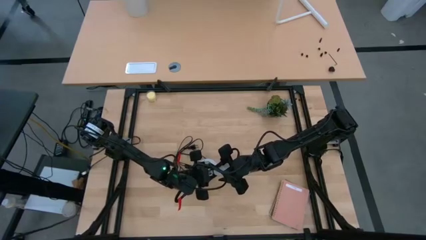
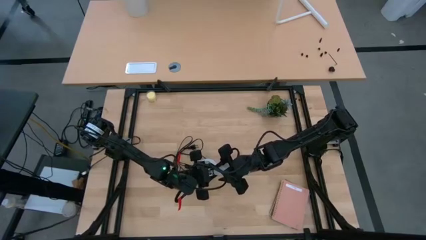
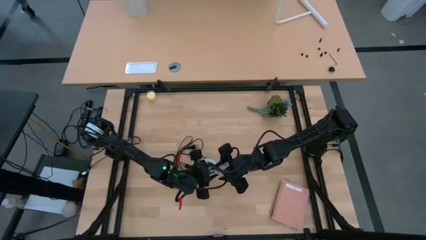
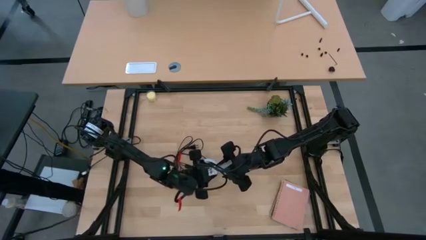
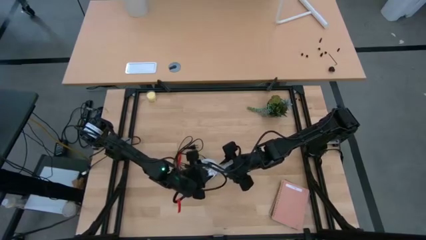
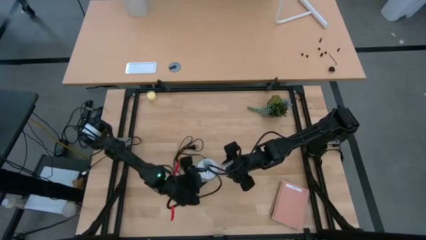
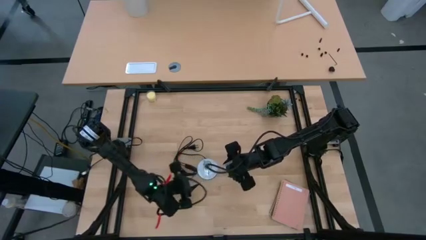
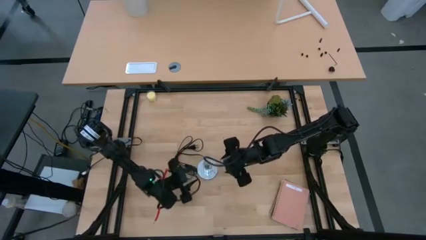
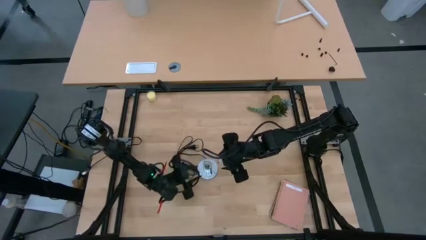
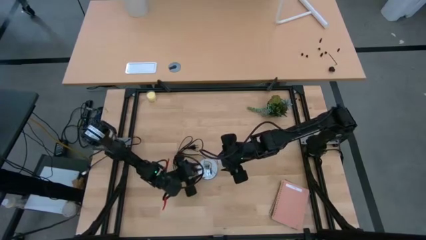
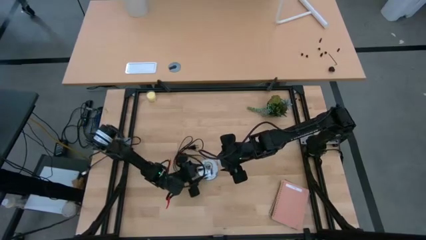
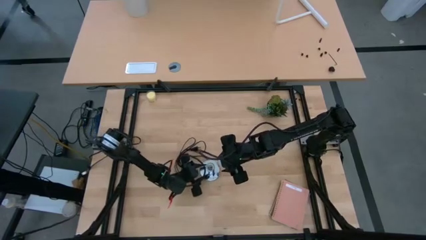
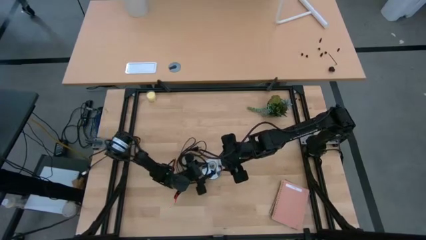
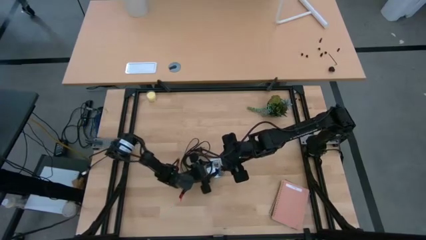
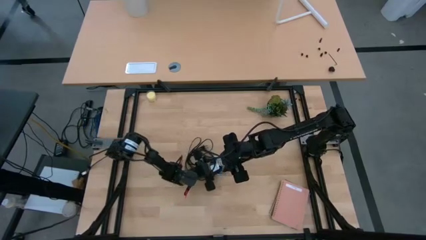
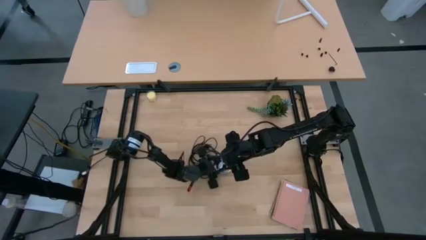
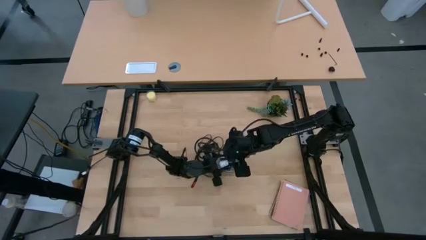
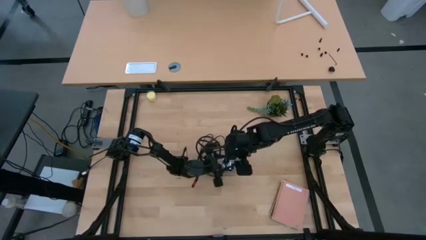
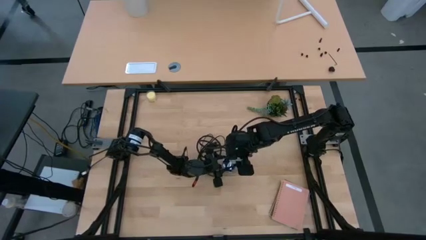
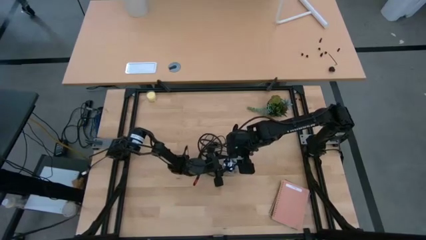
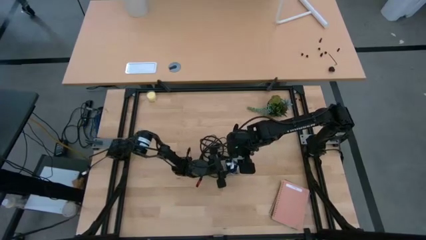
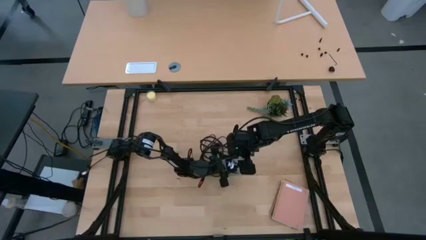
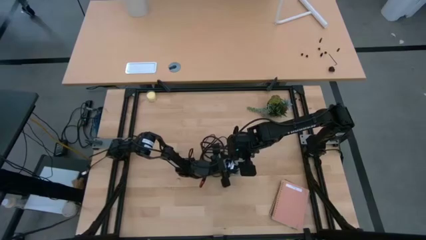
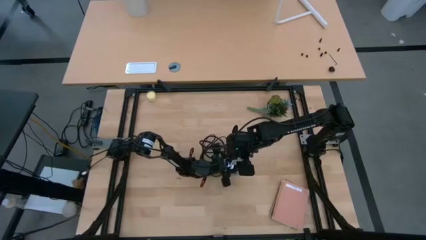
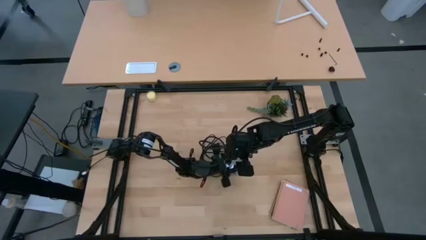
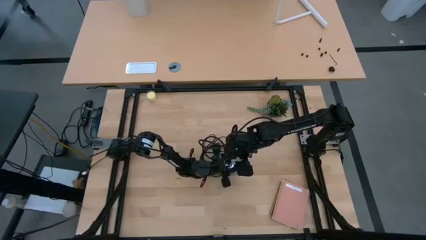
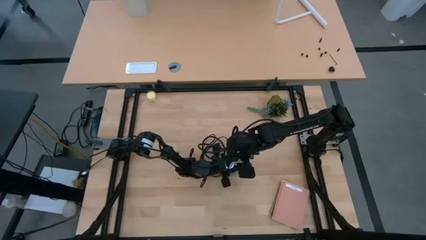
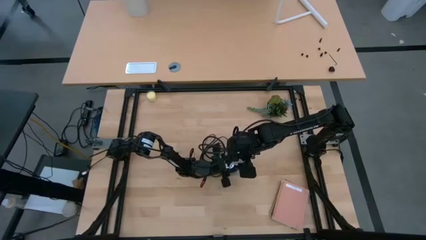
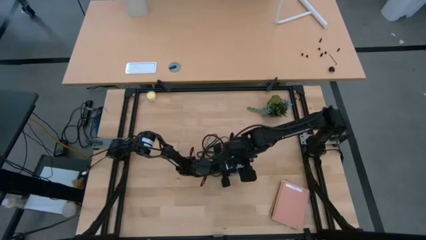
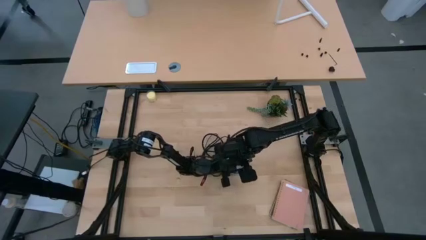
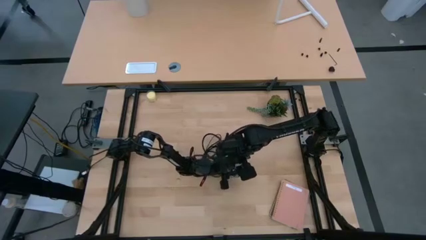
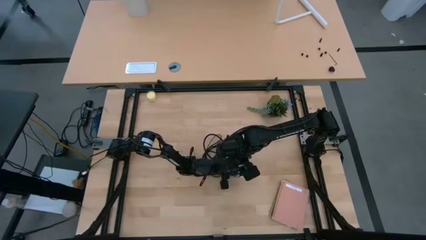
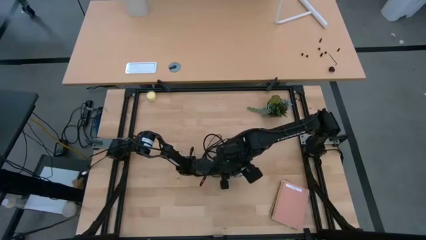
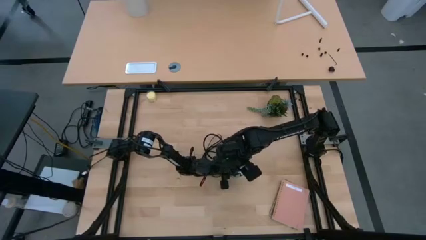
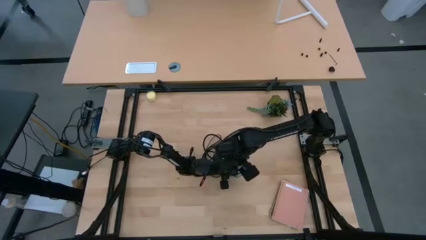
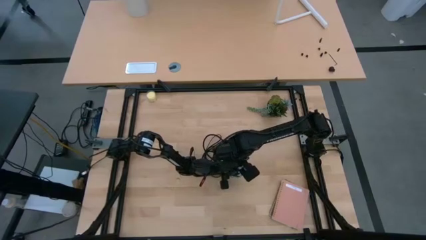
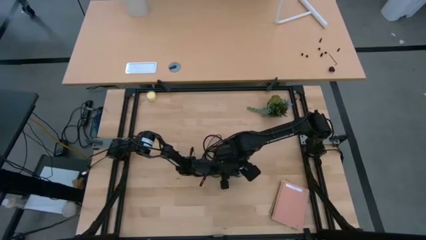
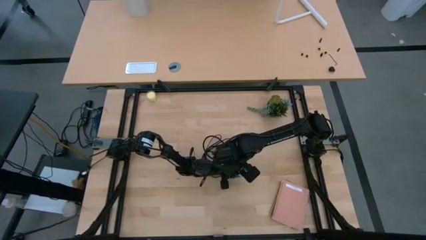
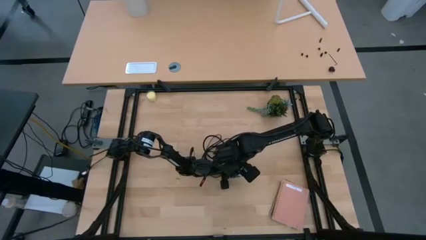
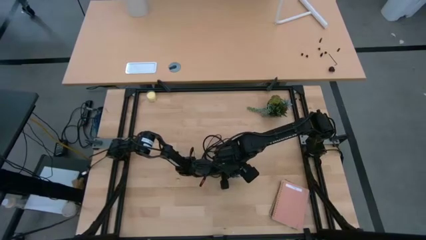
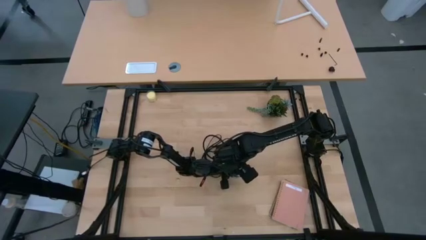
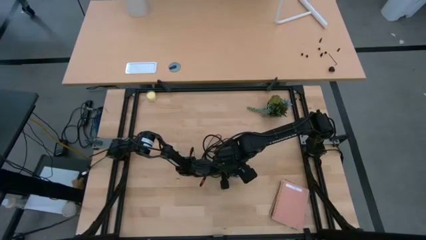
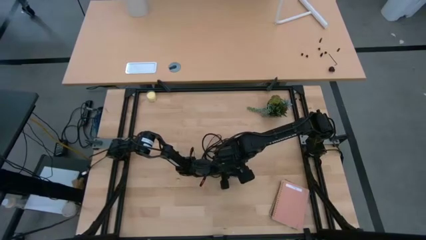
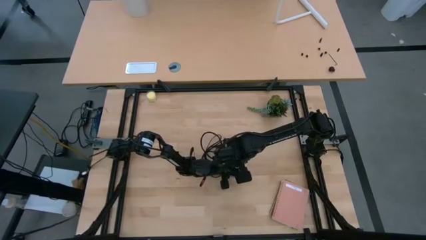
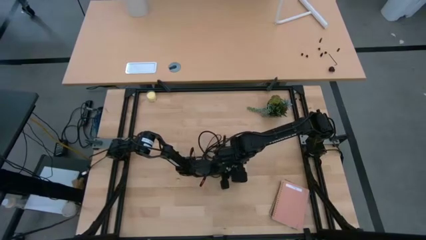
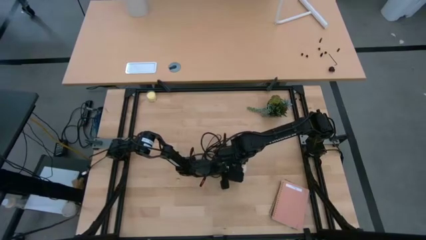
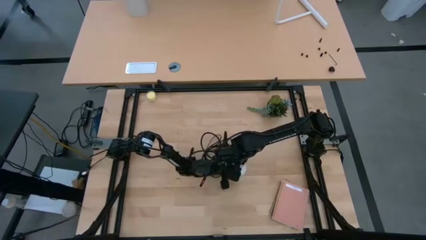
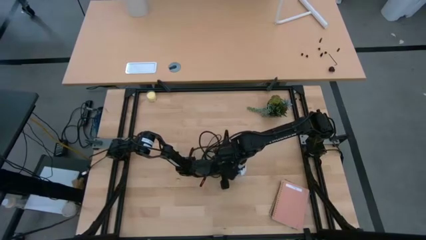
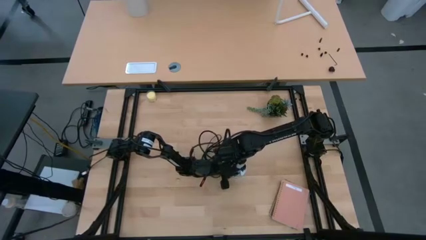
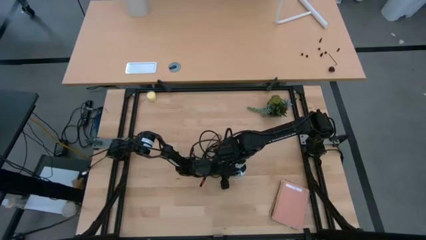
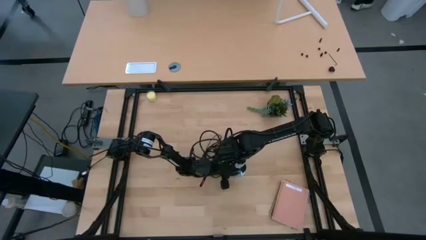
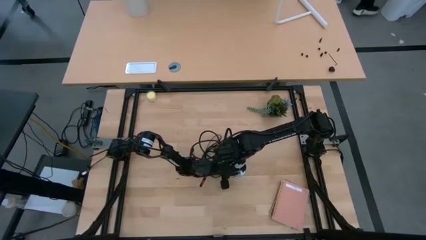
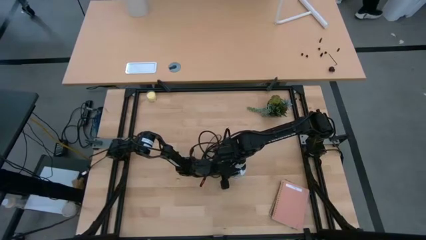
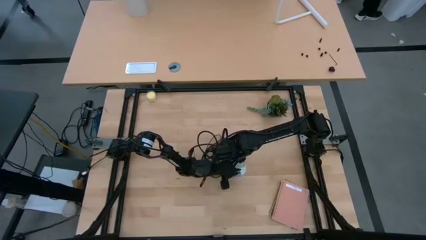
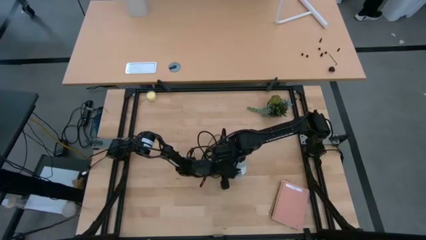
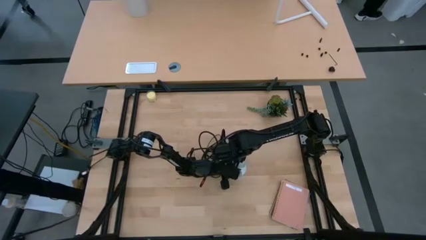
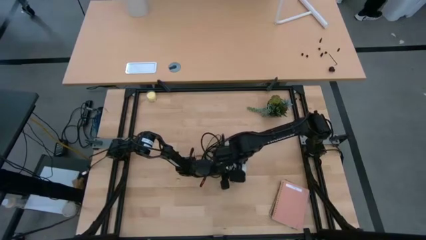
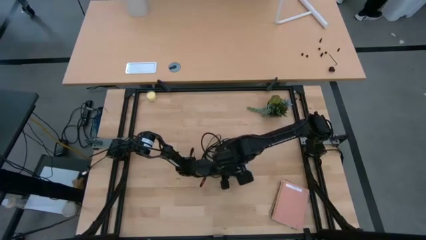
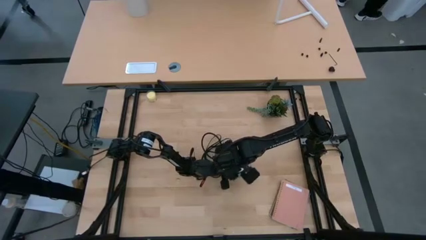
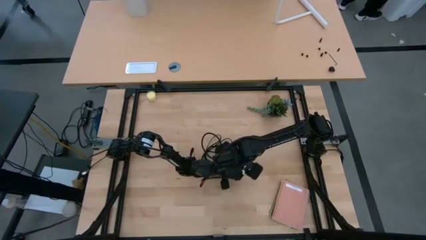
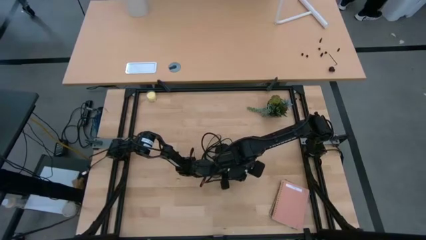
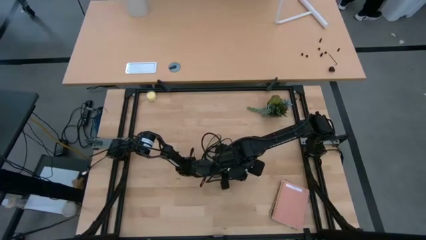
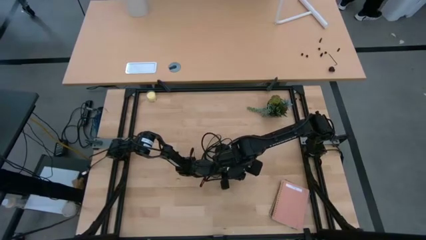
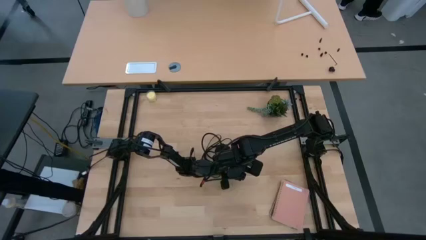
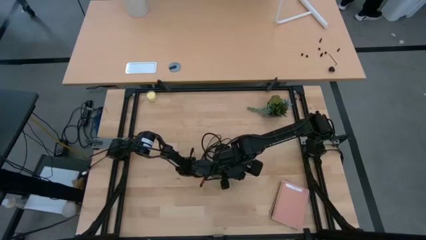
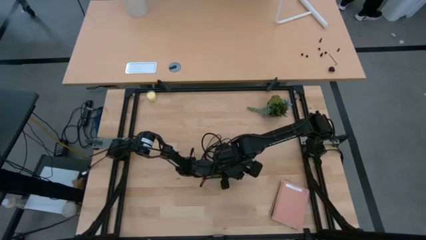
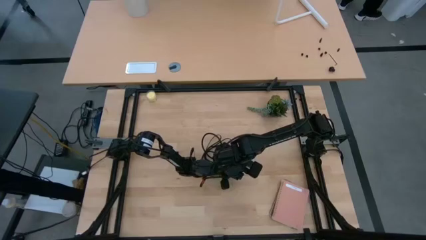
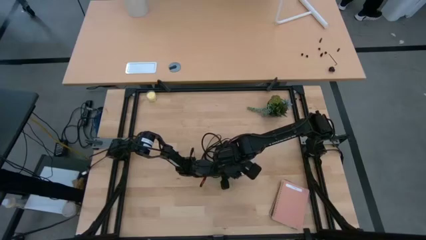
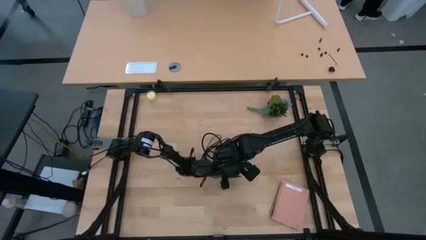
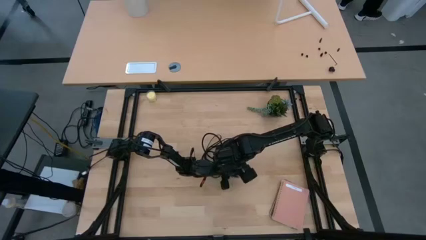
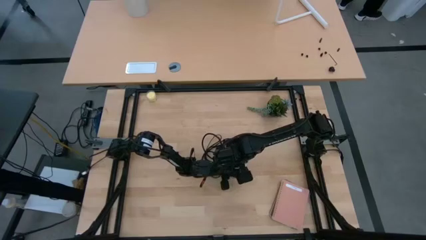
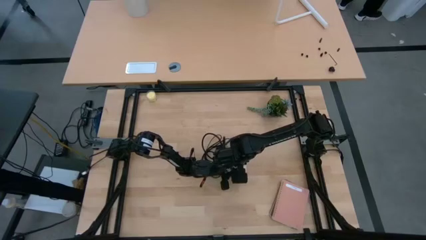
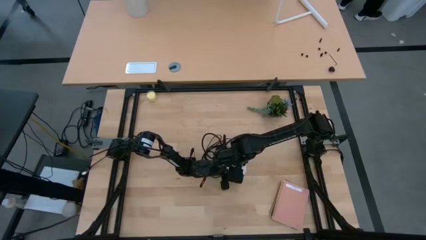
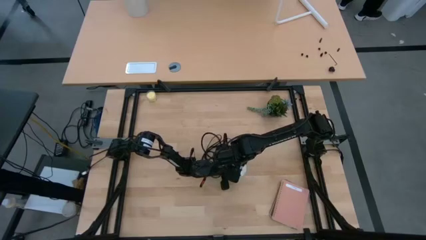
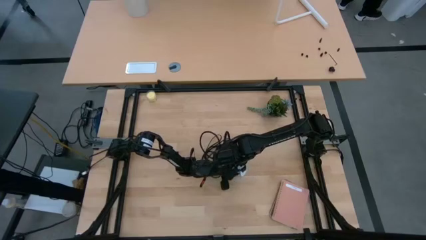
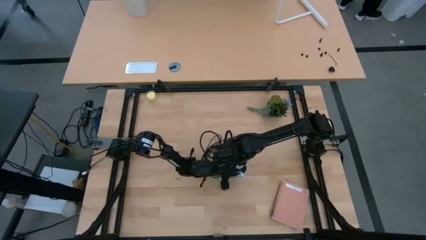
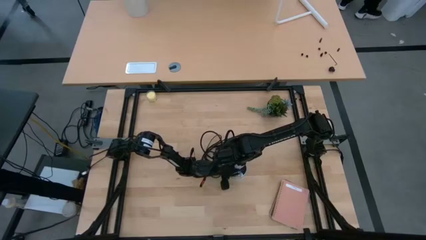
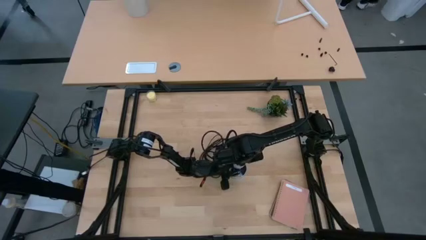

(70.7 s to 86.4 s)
Task: Screw lightbulb
Insert the light bulb into the lamp
